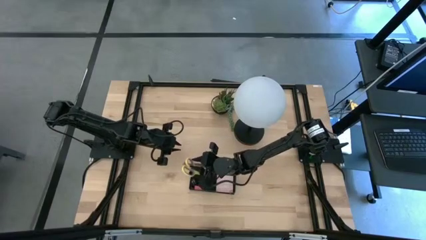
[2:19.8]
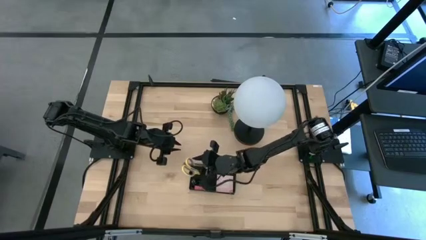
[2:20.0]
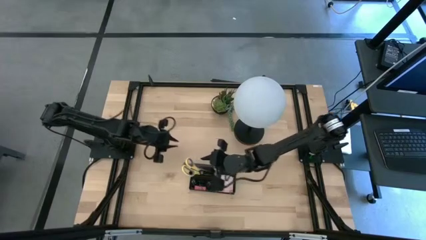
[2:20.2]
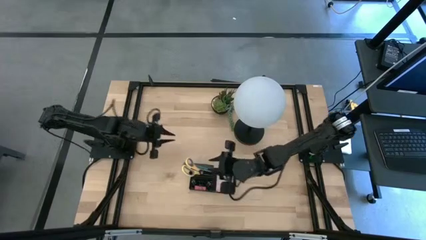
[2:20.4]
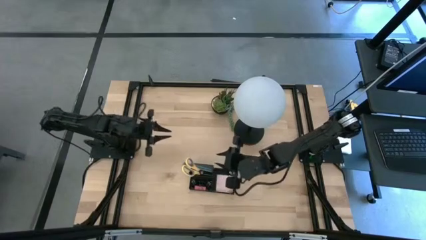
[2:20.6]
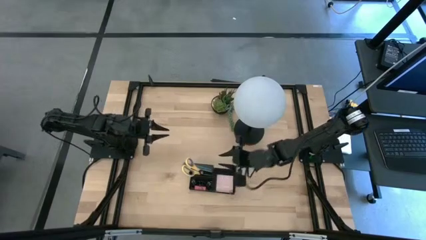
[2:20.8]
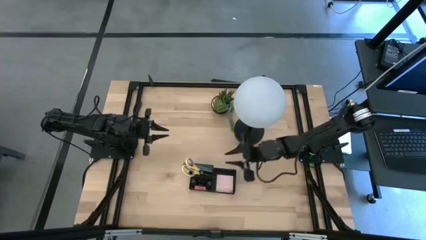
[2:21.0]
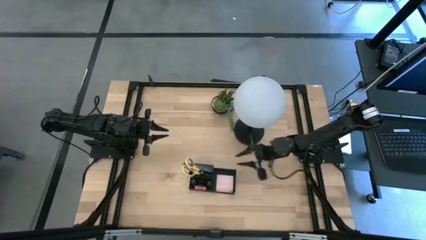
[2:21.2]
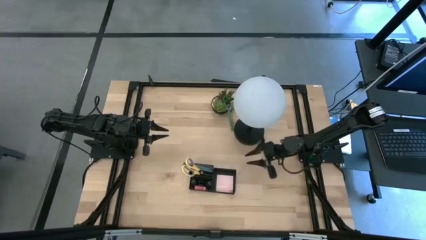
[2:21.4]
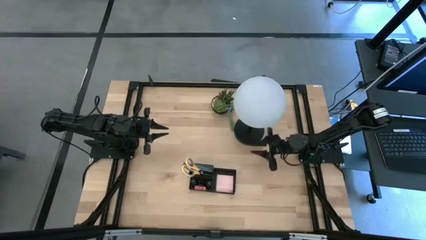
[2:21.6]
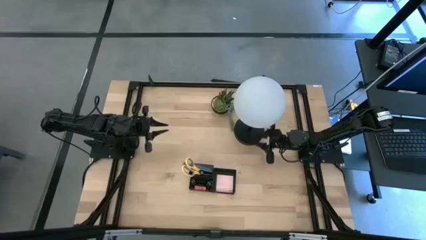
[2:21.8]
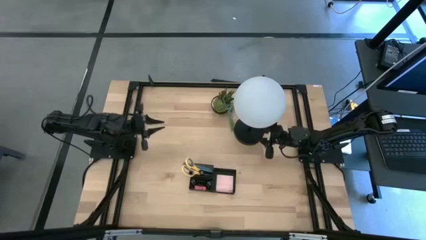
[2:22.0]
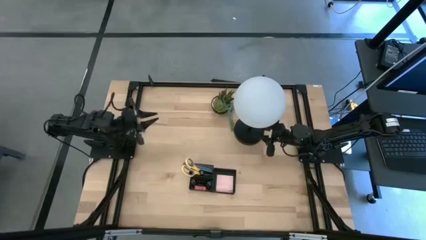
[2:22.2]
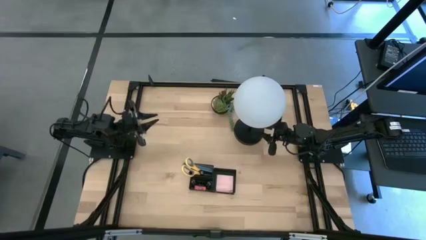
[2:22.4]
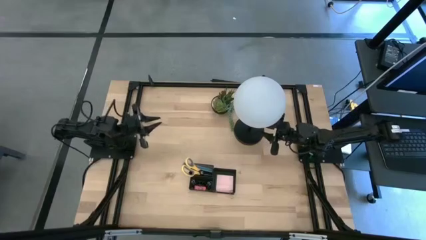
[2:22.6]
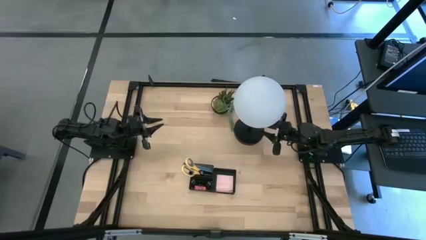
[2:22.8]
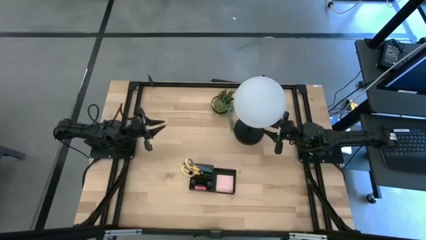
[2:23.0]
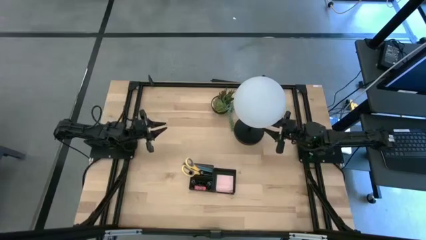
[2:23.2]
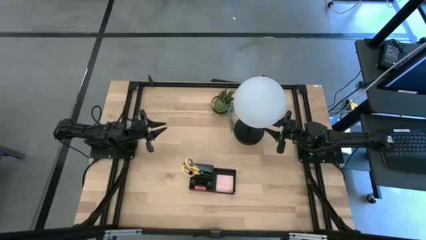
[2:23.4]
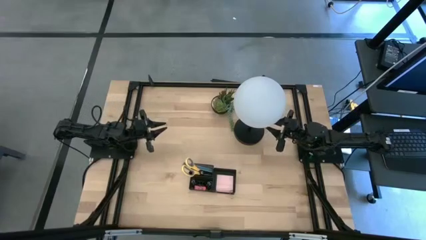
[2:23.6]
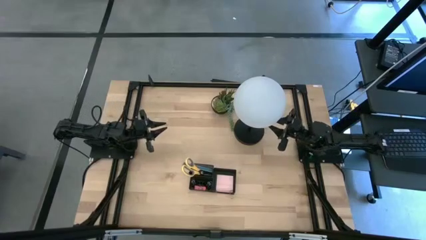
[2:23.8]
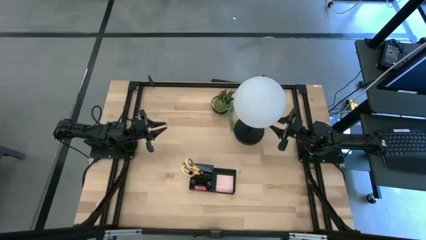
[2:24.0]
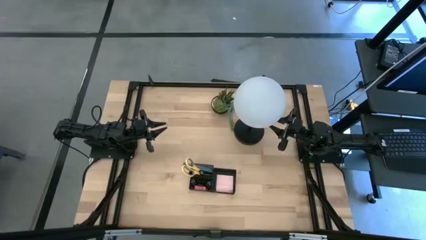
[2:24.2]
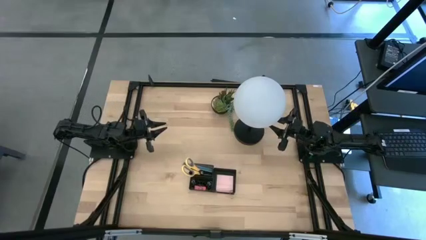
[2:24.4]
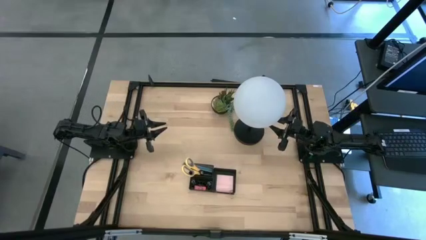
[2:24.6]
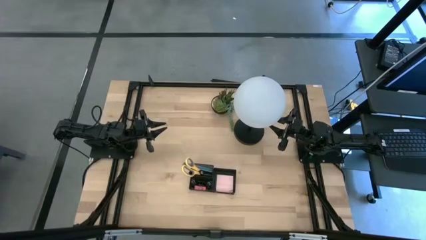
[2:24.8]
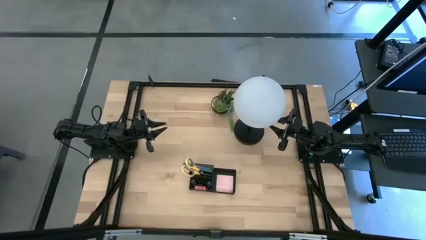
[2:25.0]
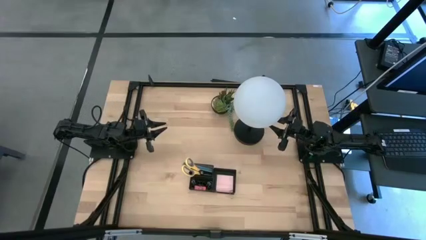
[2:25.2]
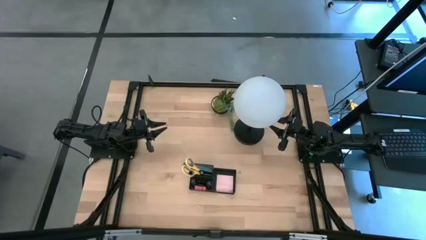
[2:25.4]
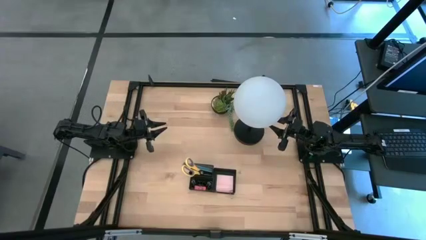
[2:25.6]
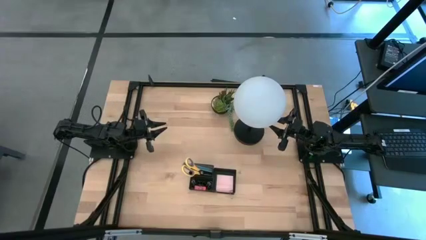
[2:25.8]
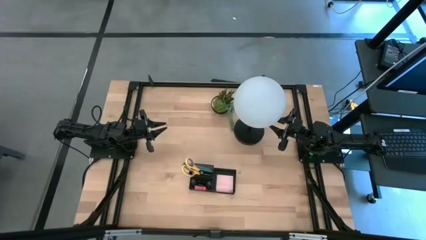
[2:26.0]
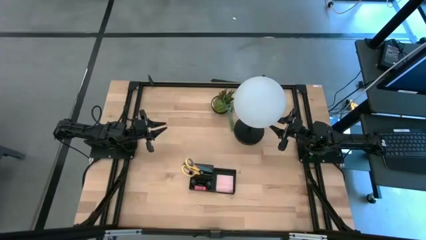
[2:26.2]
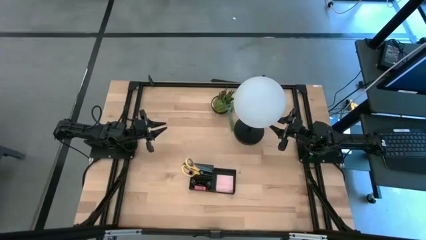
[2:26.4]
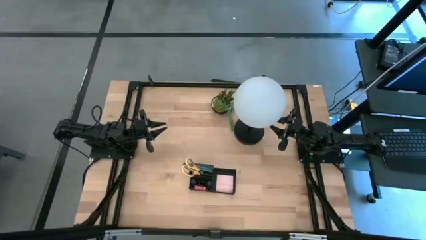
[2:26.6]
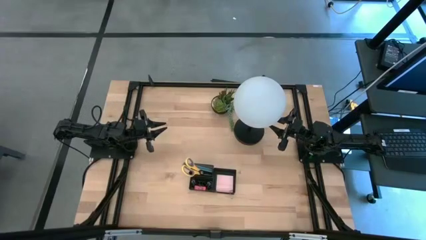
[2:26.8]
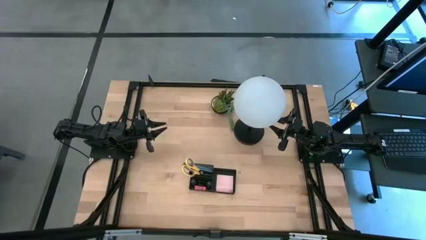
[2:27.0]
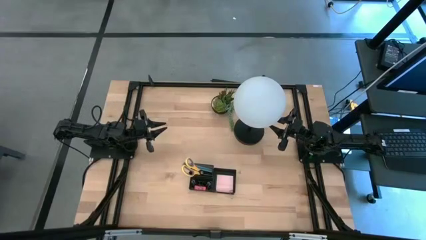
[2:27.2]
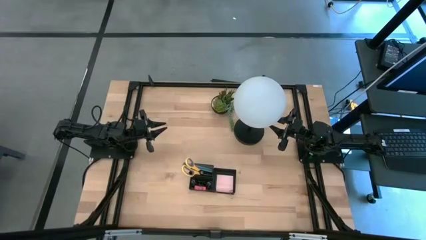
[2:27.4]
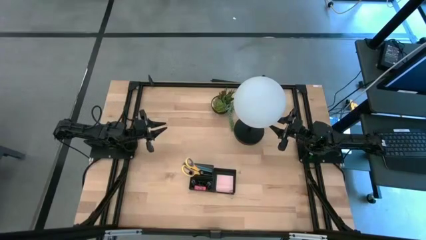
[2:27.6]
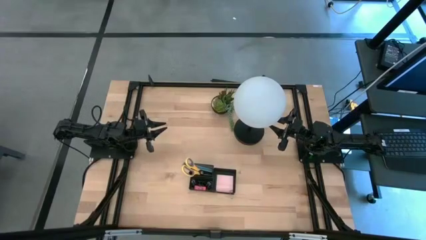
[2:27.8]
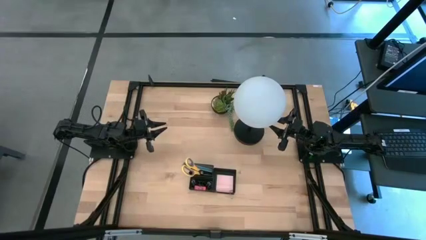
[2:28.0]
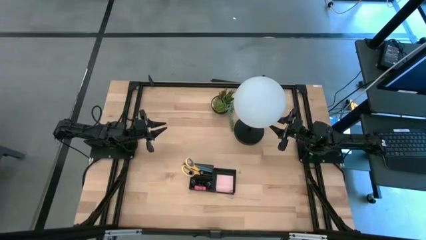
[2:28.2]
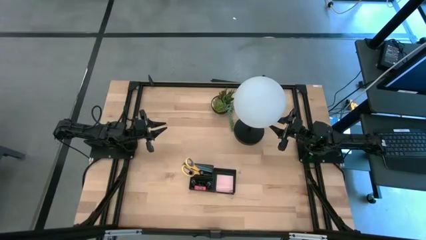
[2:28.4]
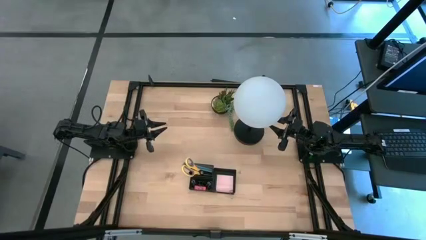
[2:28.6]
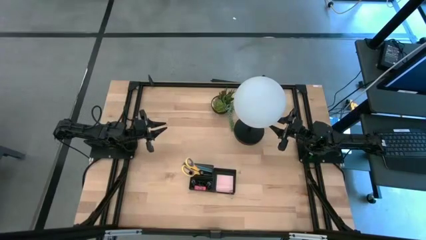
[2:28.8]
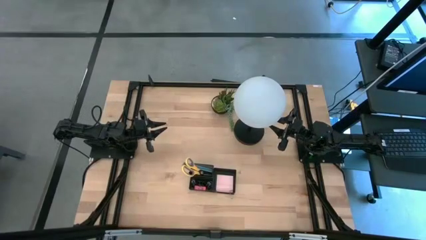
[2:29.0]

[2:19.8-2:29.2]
Task: Pick and place office supplies into organizer
Return to Home Position
